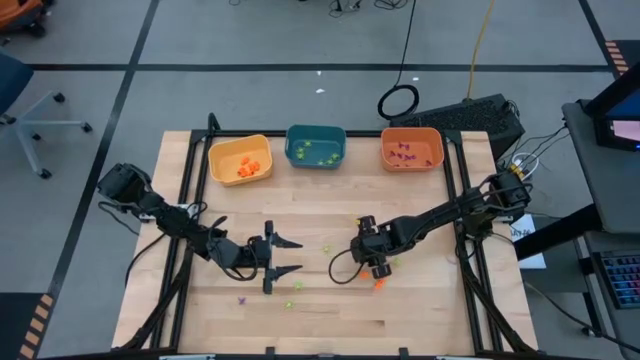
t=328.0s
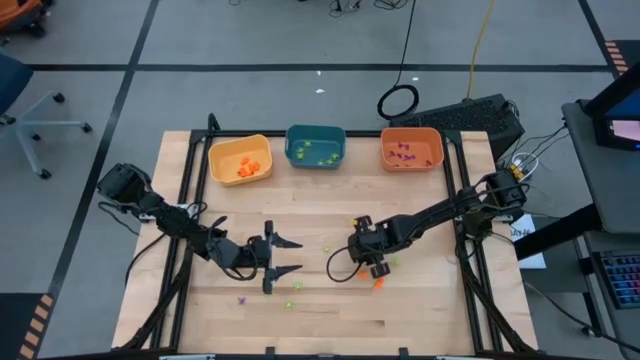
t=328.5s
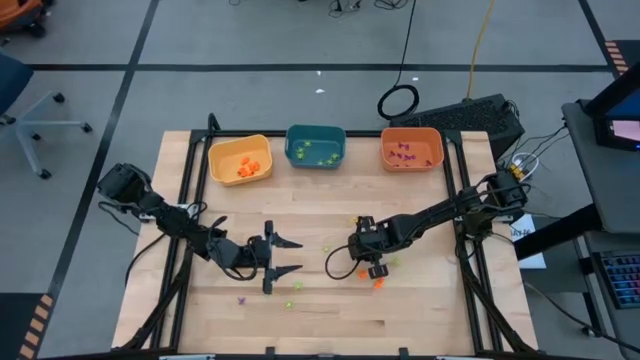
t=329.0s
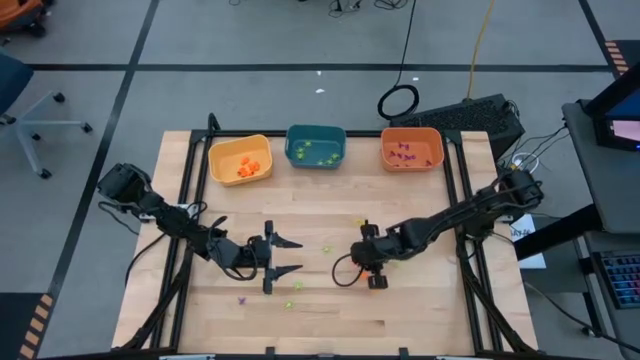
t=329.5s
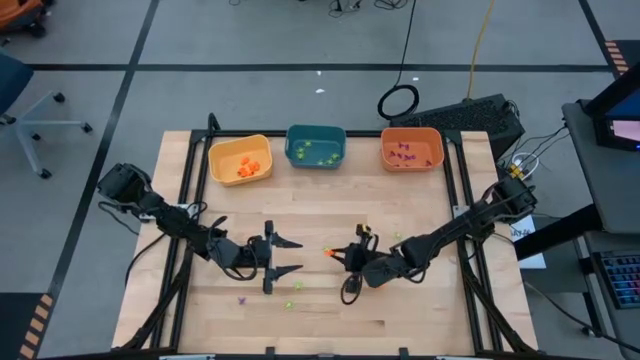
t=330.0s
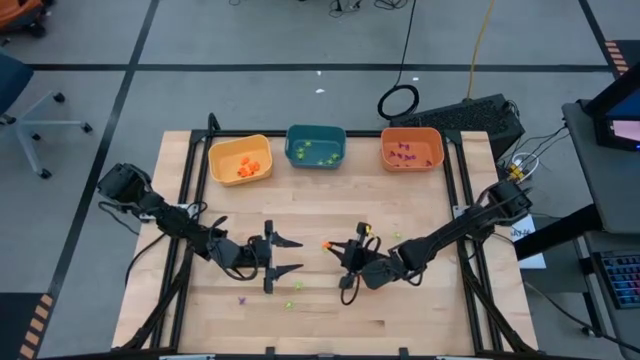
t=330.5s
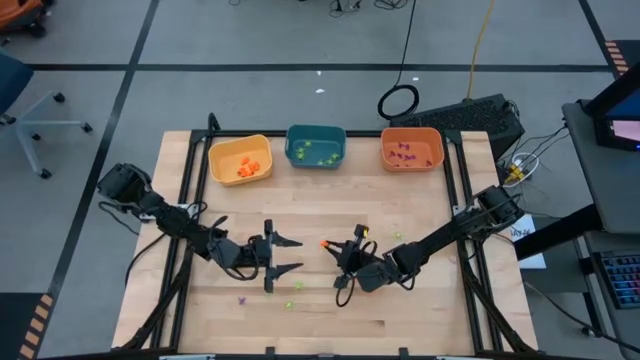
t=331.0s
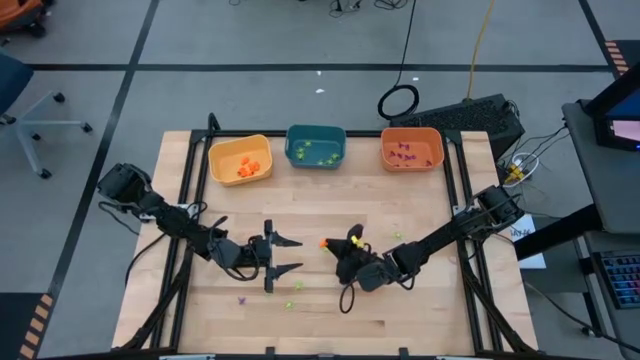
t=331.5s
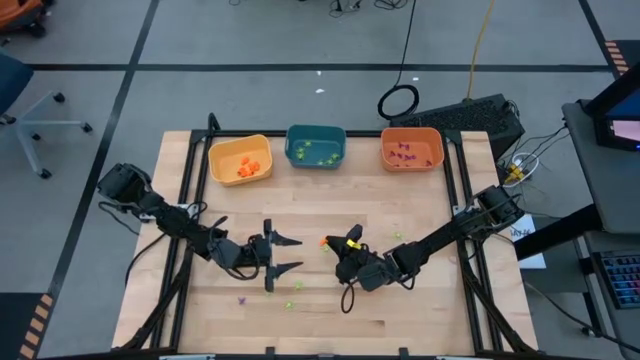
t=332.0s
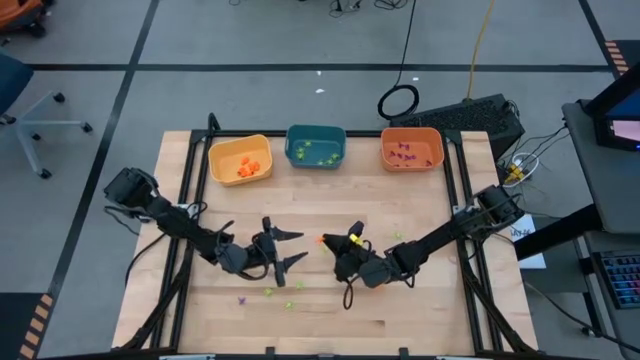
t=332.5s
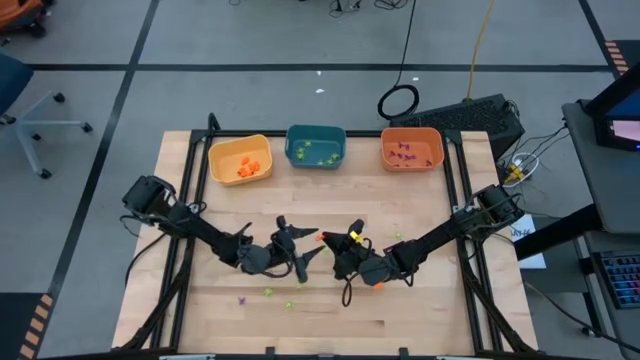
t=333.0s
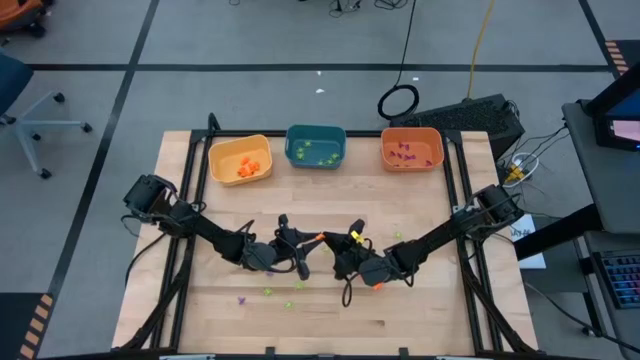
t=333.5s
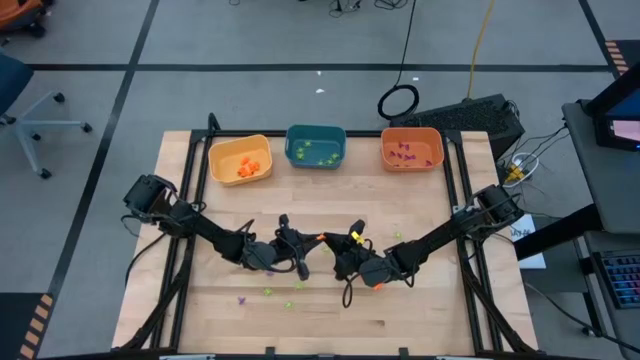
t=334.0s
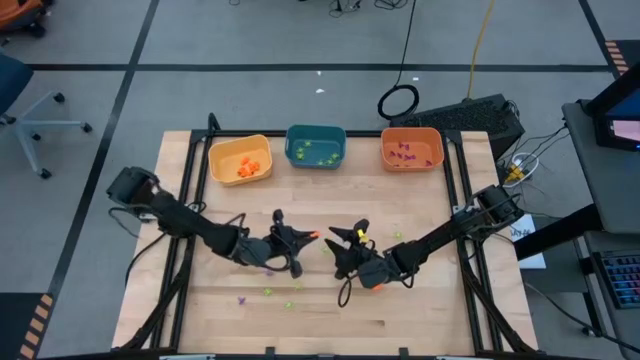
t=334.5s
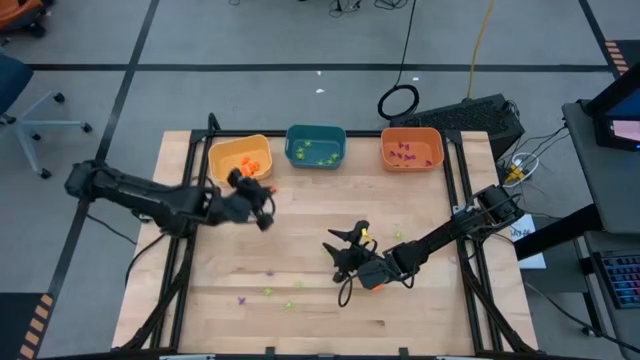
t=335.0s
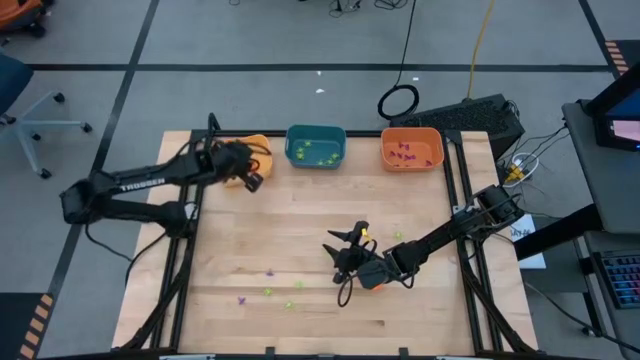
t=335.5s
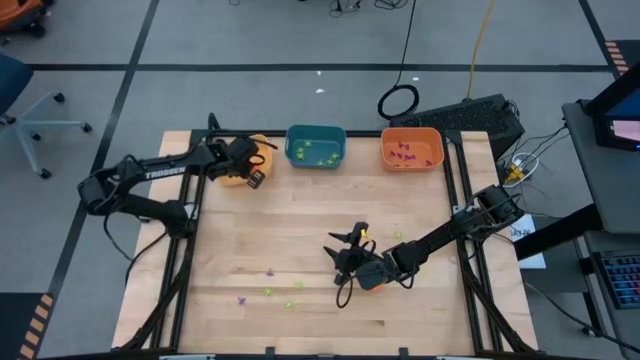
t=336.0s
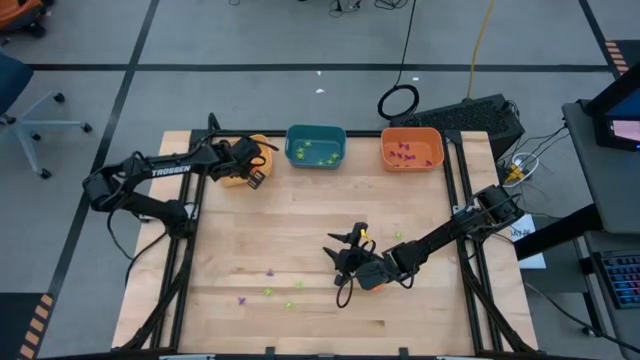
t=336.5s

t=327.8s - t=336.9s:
Task: Sort Halloween decoration
Put the orange skeleton toy into the yellow bin

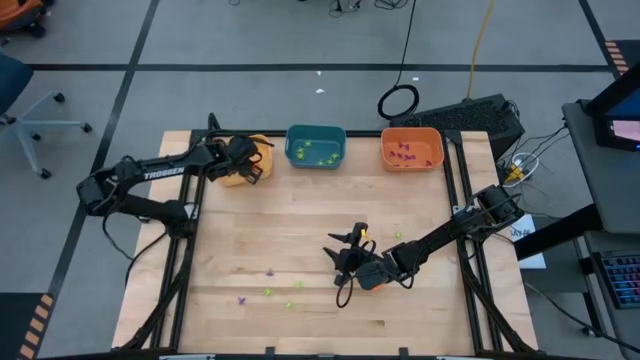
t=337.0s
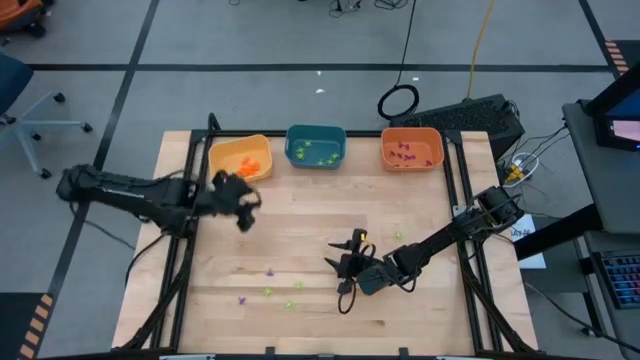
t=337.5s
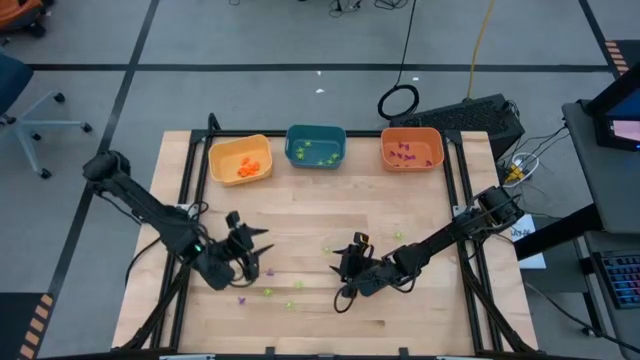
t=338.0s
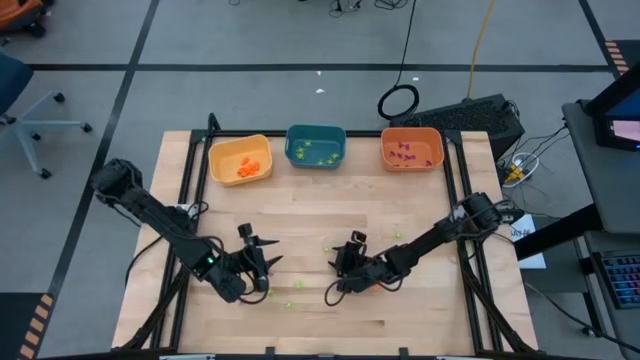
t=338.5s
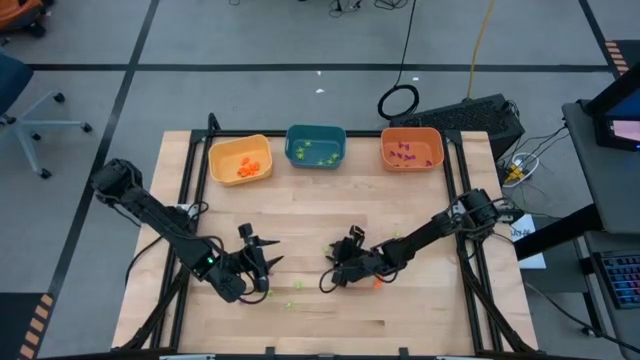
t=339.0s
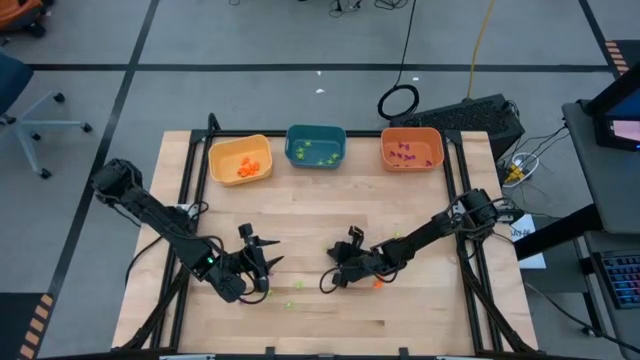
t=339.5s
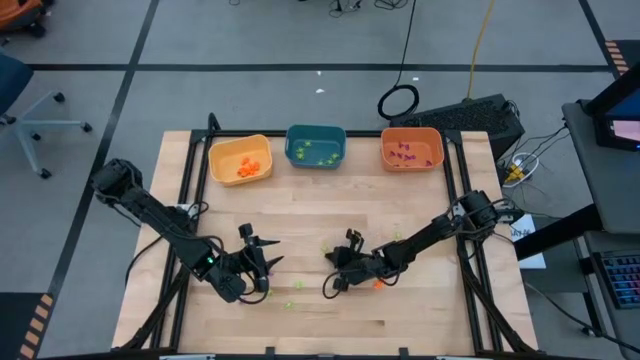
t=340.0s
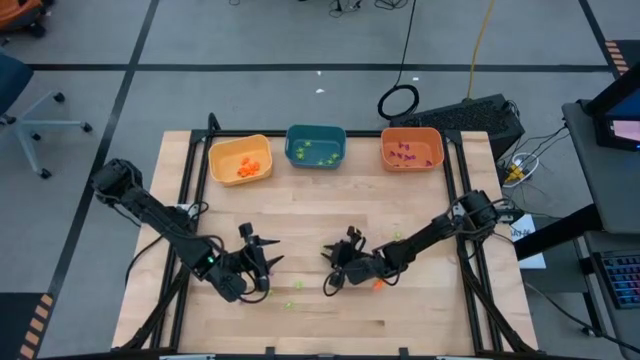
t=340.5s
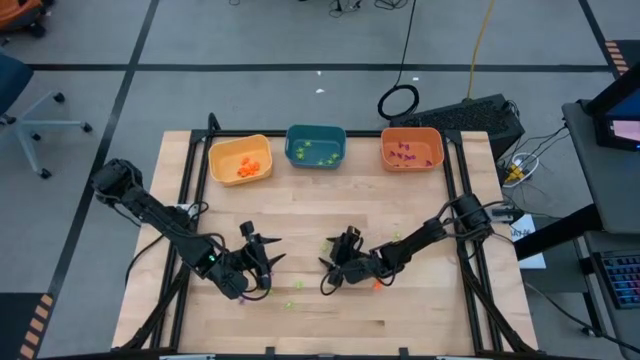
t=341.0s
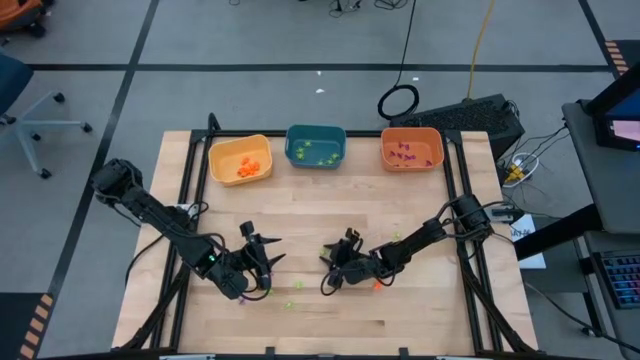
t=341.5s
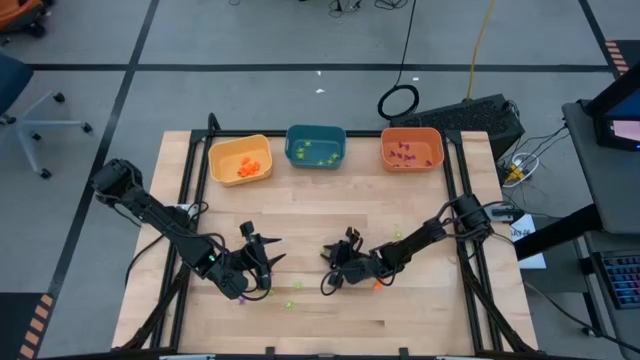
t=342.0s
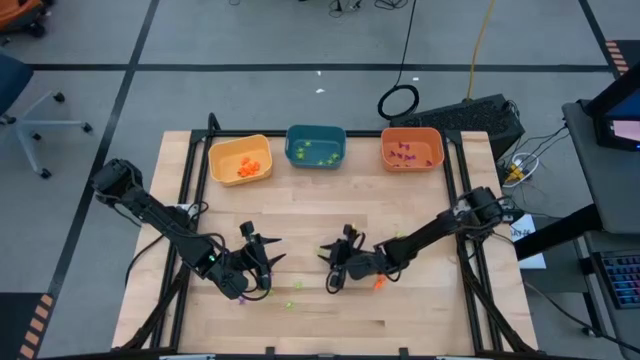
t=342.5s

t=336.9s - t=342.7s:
Put the green spider toy into the blue bin

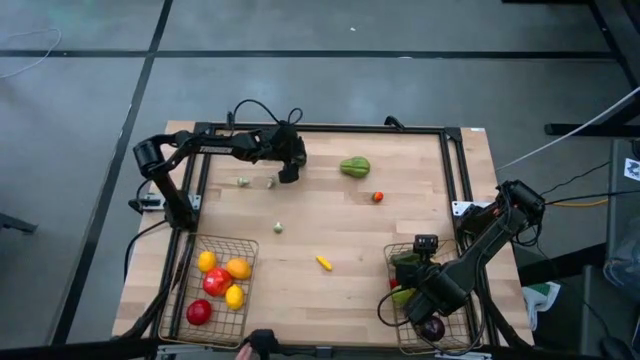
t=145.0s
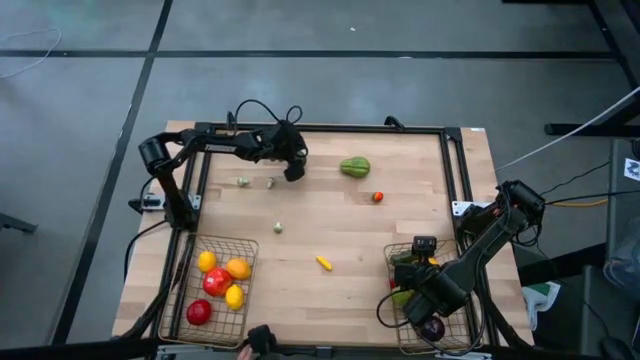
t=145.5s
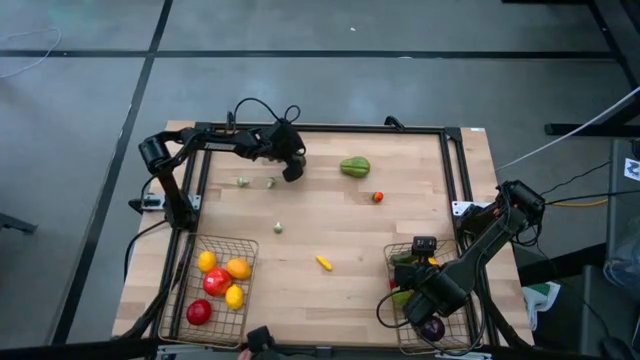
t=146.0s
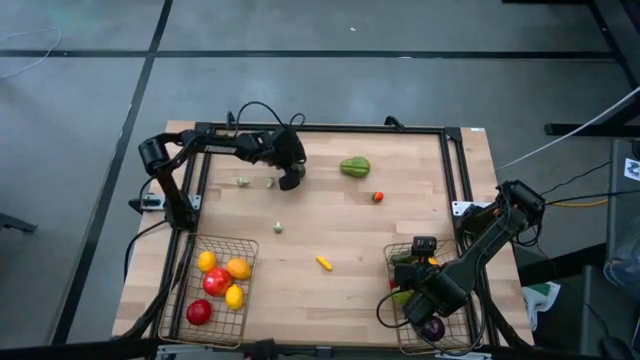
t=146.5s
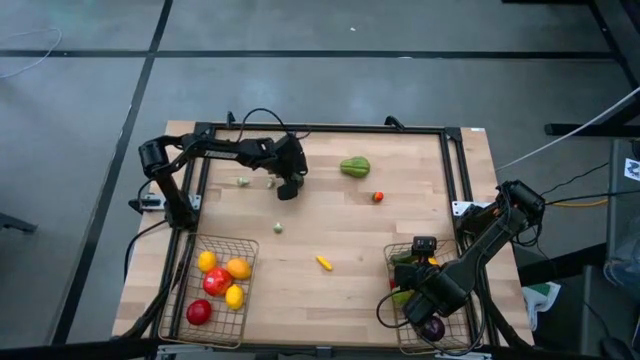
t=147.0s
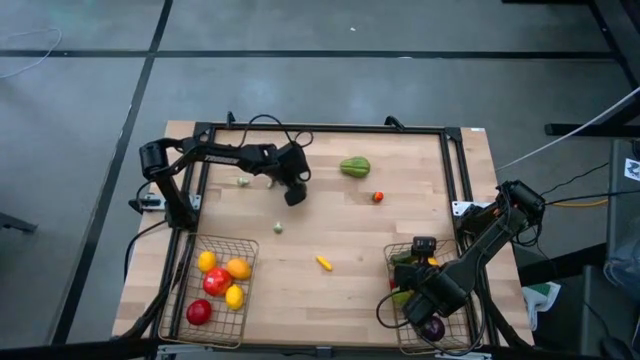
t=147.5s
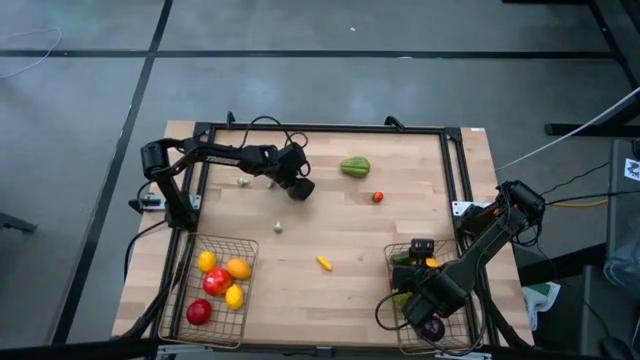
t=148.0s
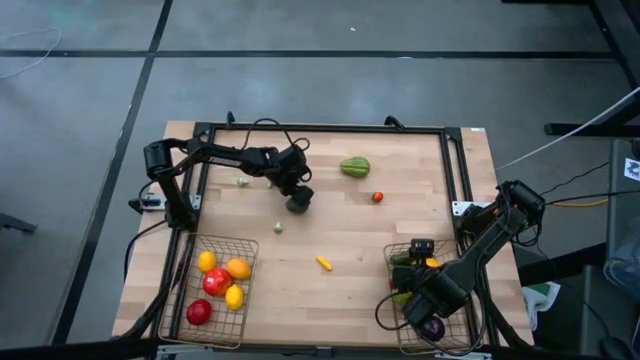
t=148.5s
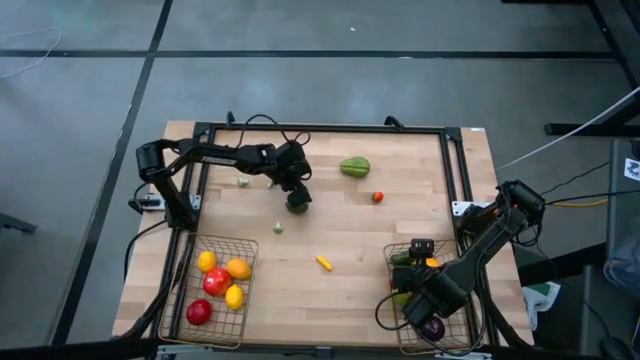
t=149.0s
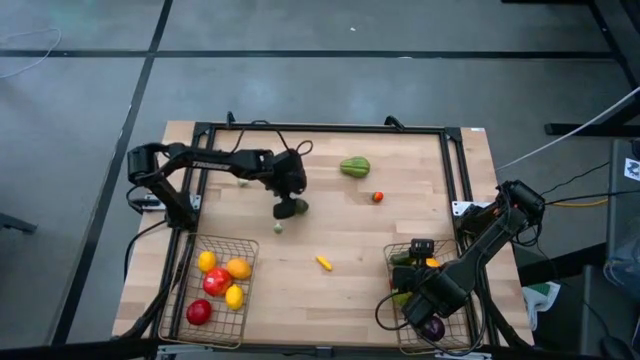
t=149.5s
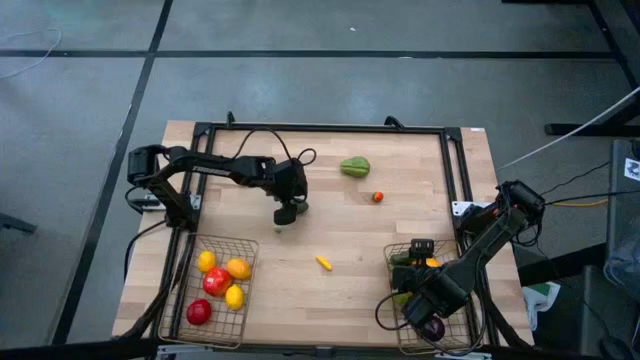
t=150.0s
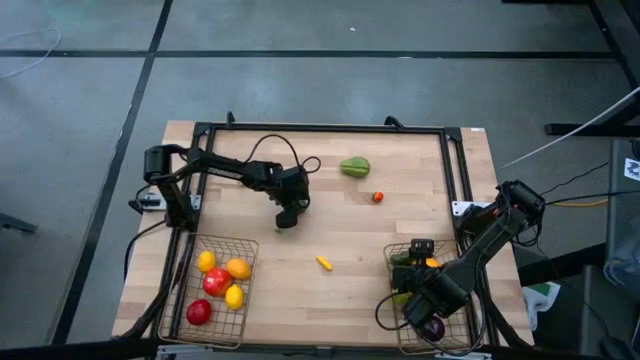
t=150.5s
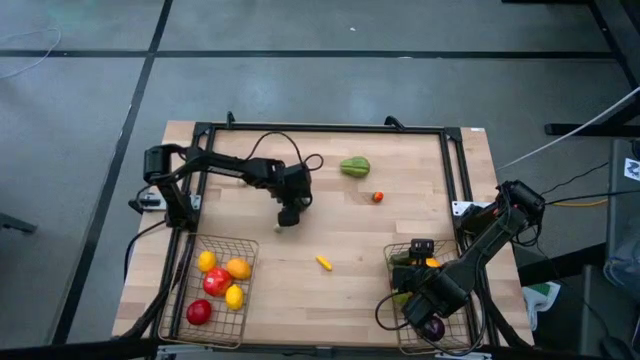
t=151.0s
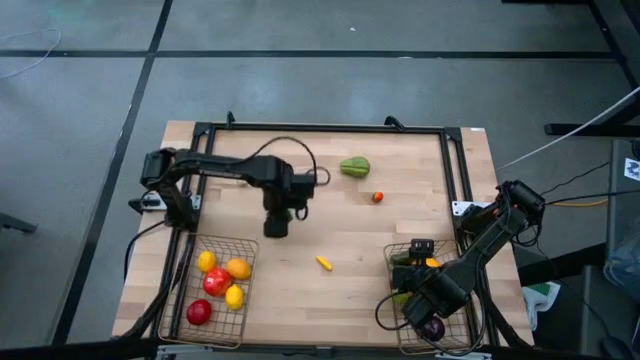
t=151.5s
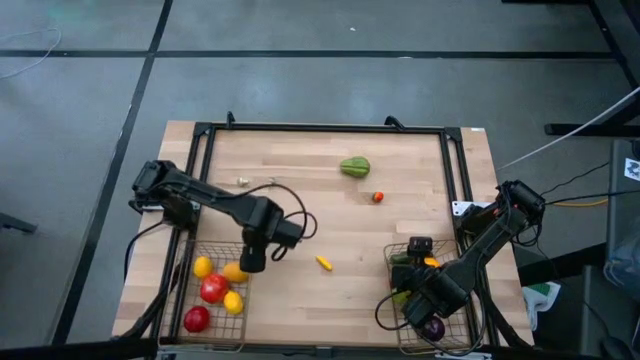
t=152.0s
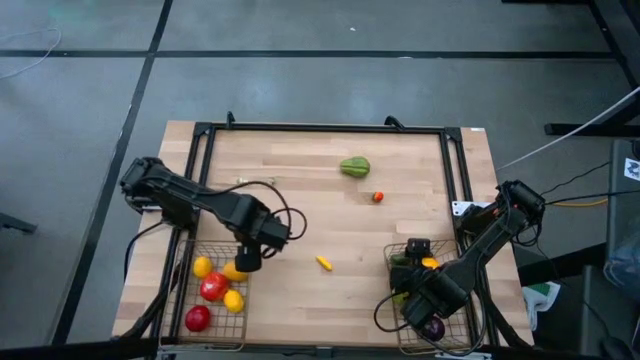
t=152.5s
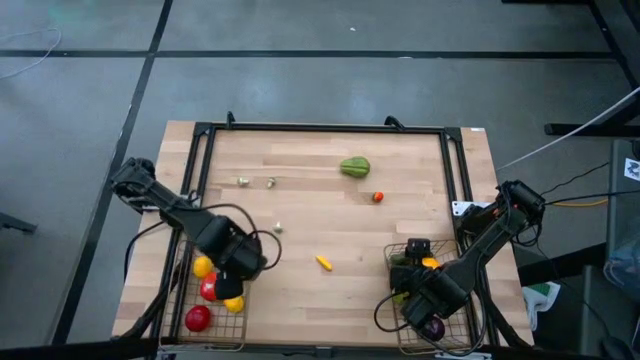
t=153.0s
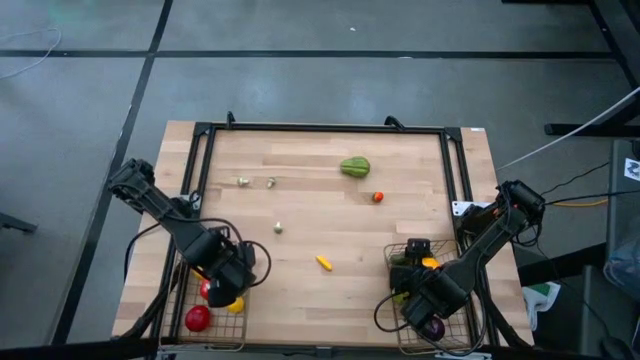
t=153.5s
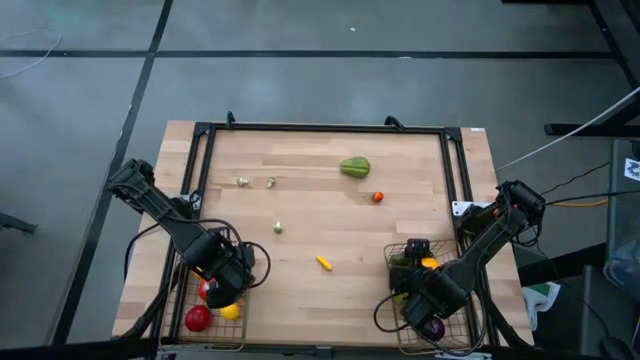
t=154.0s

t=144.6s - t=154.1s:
Task: Sort produce into baskets
Put the green lime into the left wire basket
